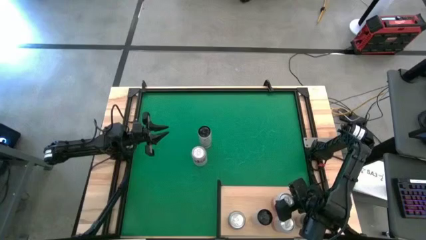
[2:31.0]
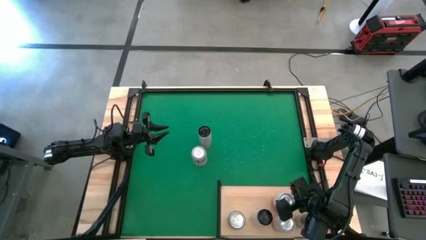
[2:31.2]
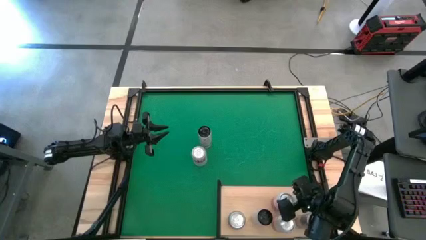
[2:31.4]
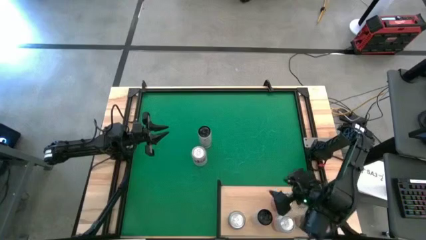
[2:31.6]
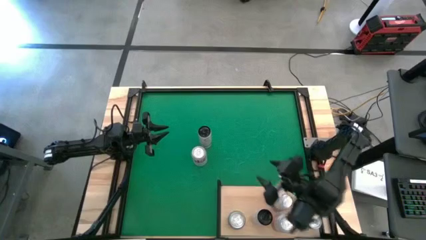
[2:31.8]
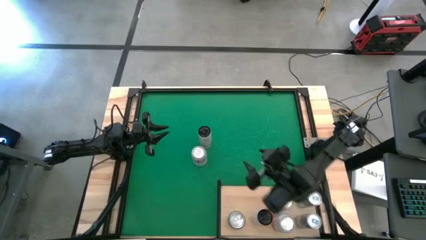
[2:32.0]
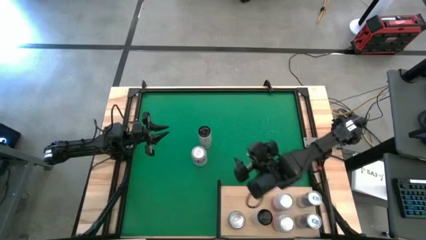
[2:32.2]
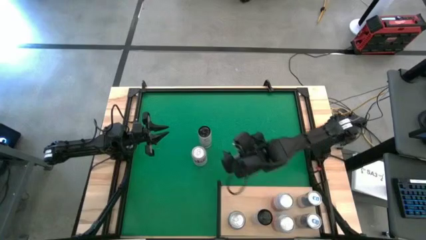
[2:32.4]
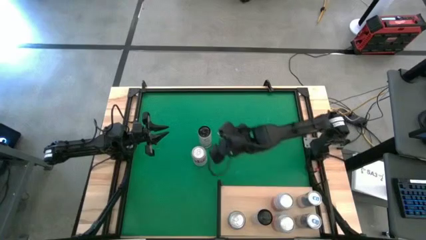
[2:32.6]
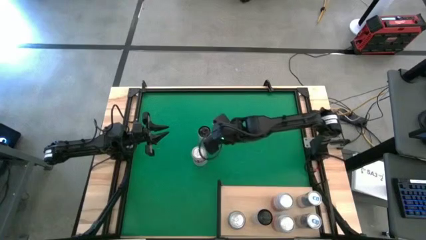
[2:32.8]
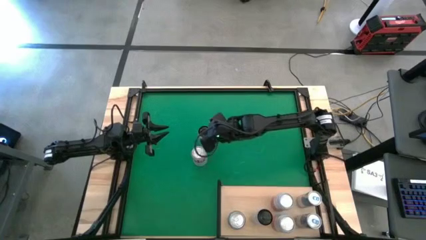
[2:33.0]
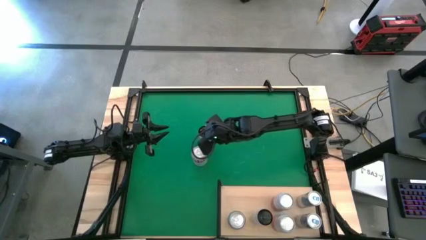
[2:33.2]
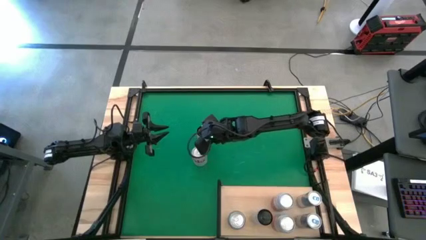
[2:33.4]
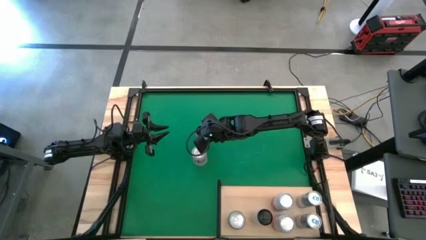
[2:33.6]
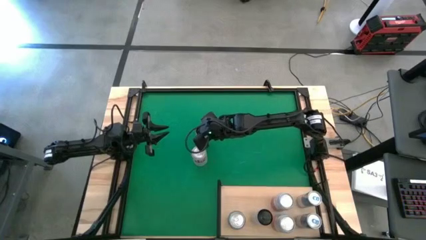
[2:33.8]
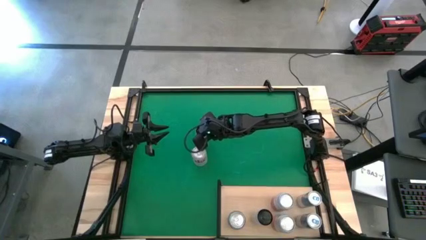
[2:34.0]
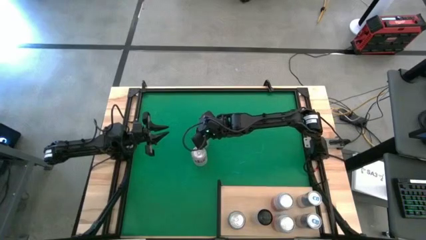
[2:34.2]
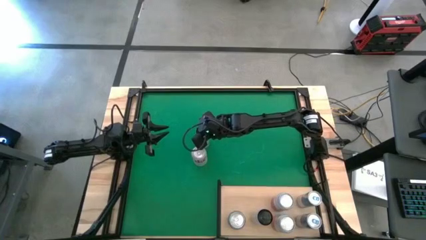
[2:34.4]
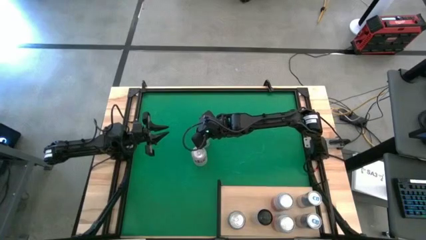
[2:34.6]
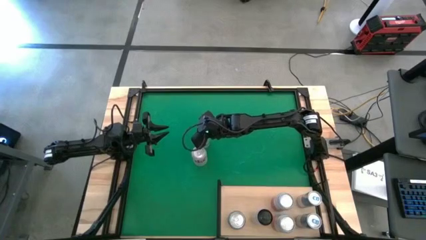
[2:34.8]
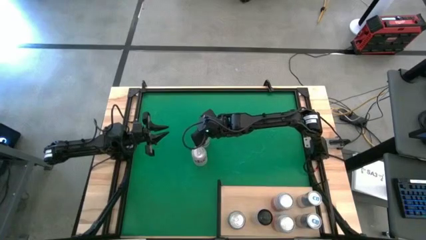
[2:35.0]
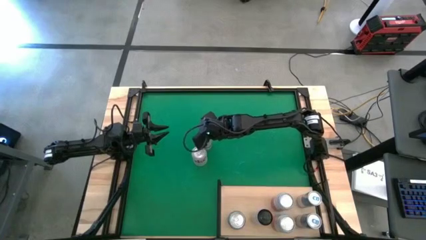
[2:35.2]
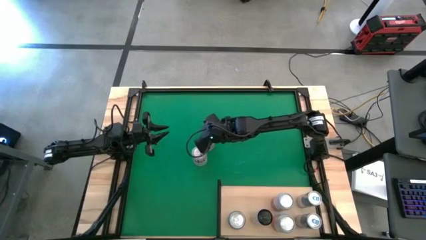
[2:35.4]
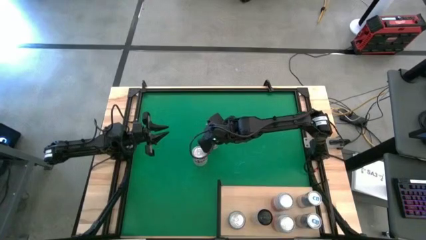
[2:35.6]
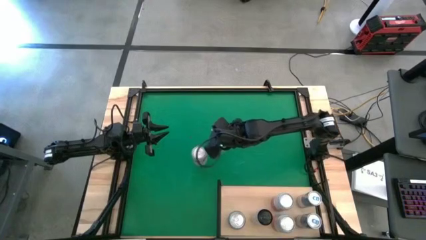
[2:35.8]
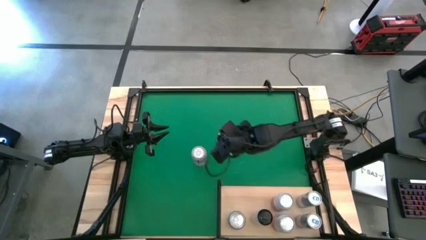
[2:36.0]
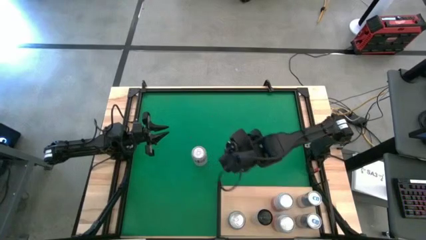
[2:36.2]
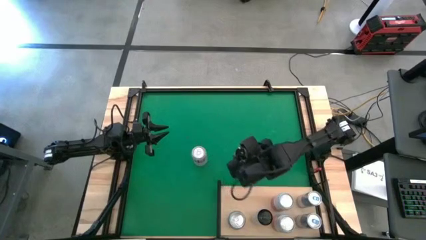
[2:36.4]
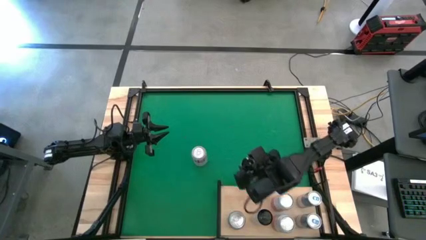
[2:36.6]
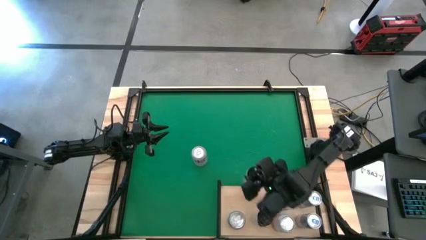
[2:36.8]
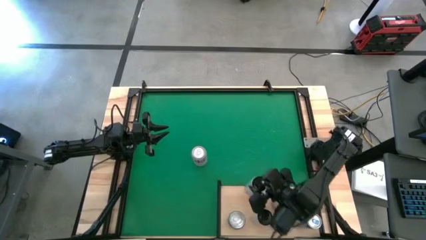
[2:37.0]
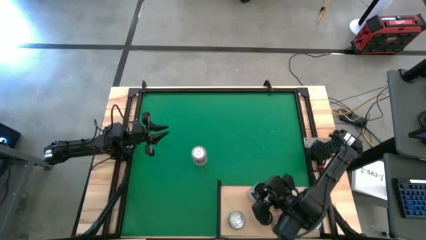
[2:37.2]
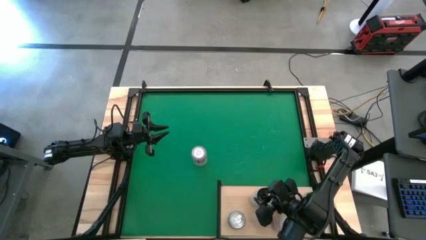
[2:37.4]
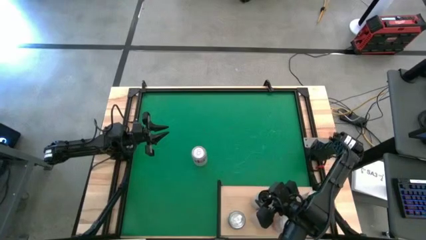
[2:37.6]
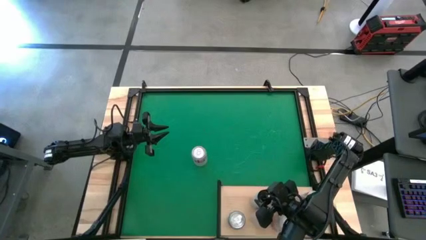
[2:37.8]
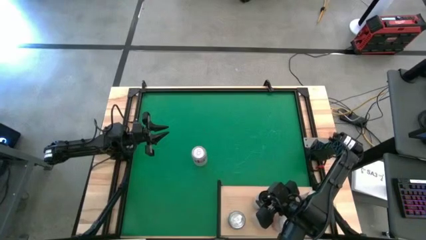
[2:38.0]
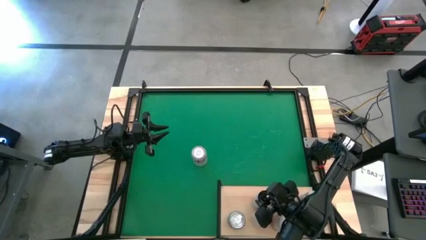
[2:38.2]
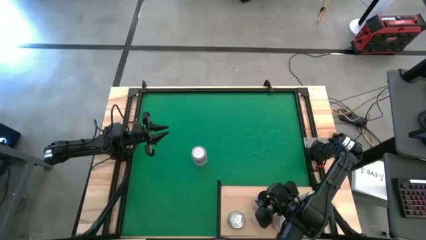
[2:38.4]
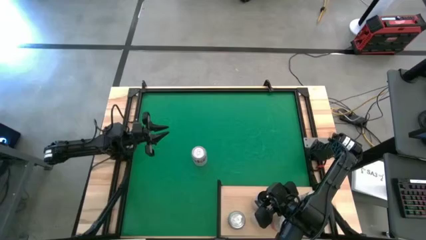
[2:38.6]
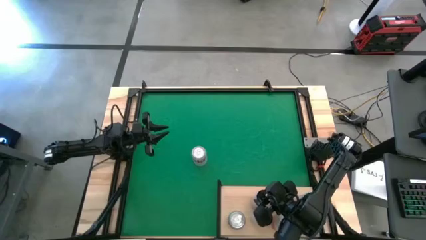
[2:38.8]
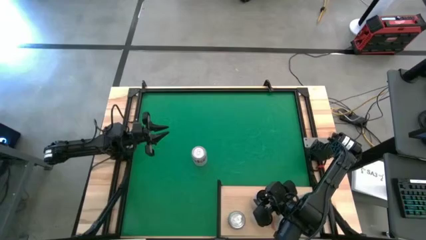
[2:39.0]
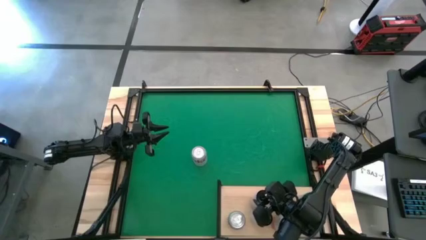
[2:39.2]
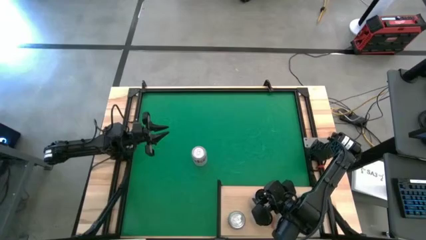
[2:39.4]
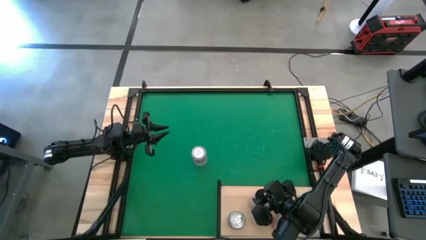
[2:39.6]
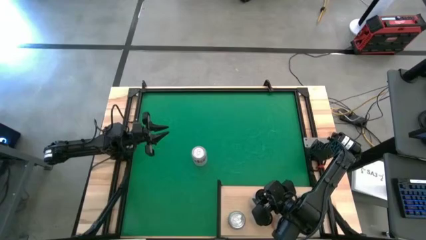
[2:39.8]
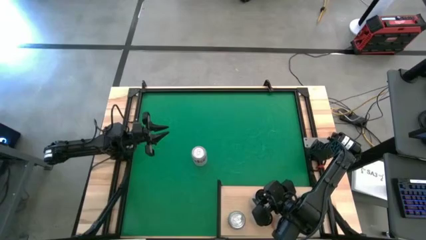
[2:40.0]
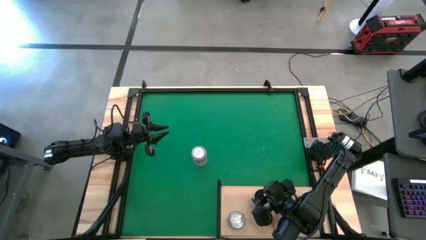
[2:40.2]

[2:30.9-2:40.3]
Task: Place canned beverage on shelf
Put the white yellow soda can on the shelf aligned with the other white yellow soda can

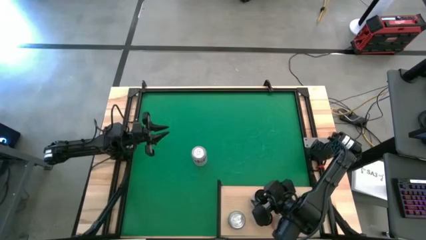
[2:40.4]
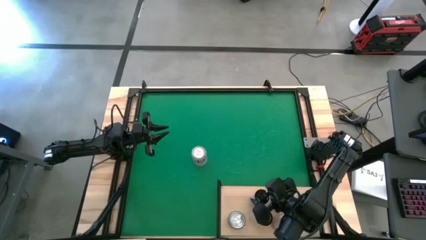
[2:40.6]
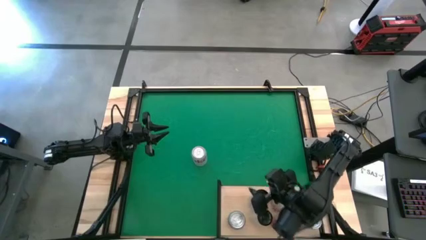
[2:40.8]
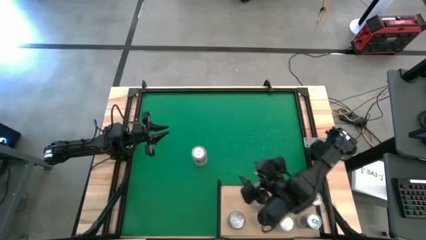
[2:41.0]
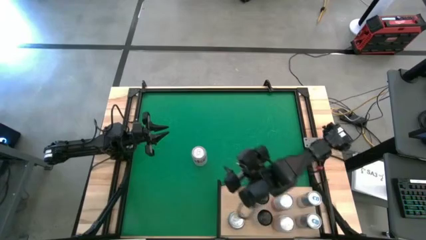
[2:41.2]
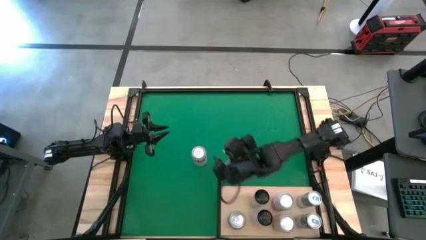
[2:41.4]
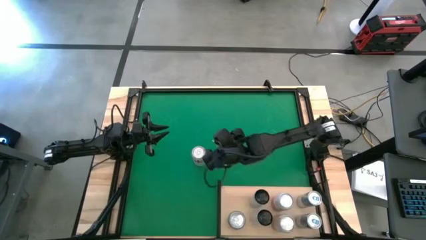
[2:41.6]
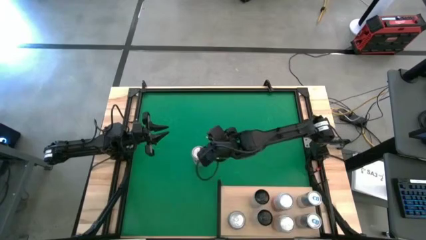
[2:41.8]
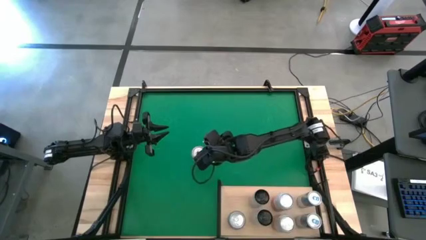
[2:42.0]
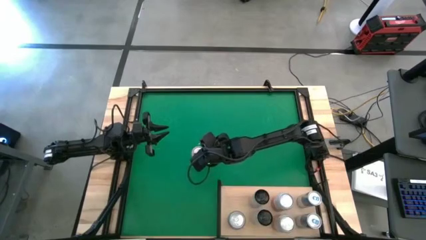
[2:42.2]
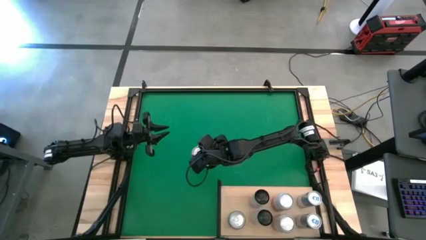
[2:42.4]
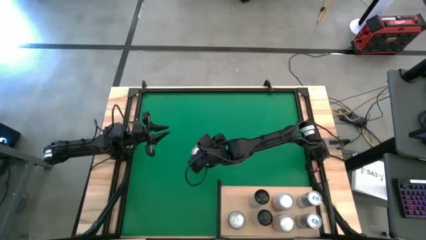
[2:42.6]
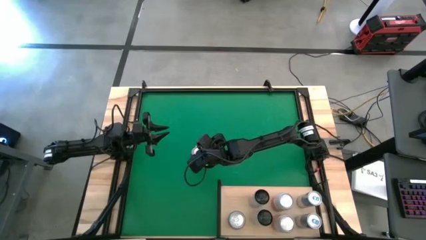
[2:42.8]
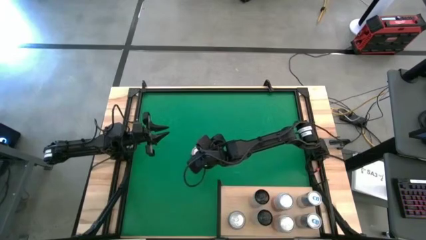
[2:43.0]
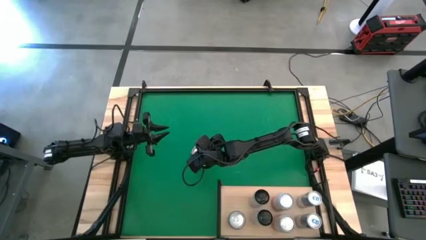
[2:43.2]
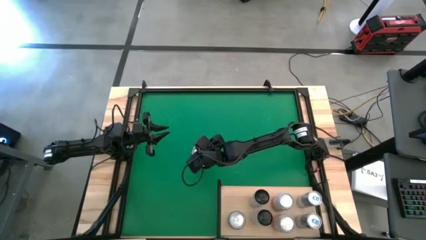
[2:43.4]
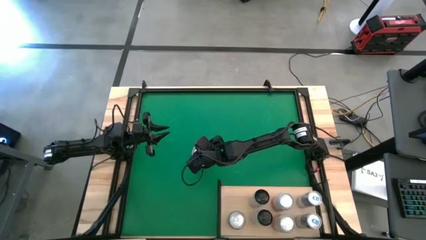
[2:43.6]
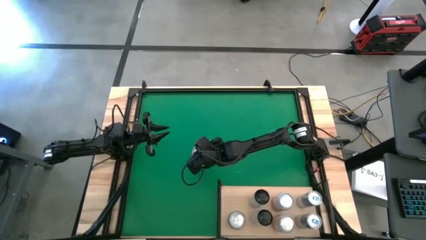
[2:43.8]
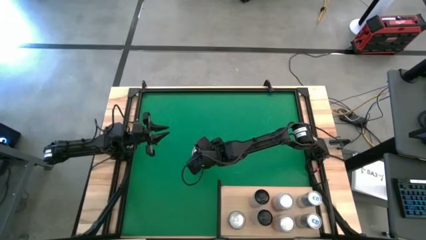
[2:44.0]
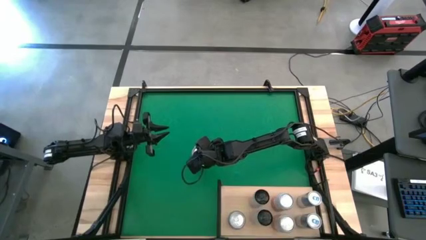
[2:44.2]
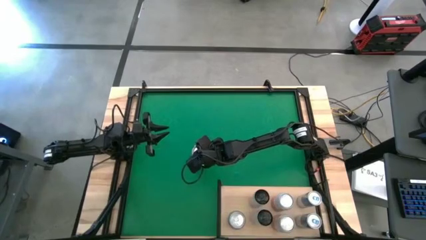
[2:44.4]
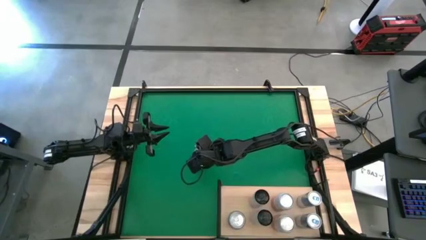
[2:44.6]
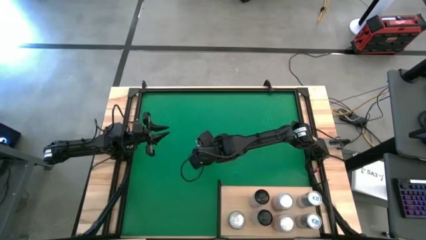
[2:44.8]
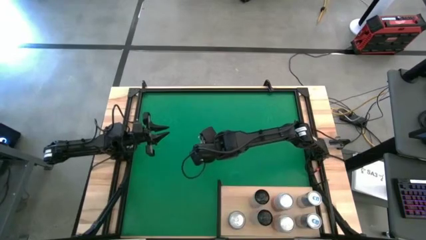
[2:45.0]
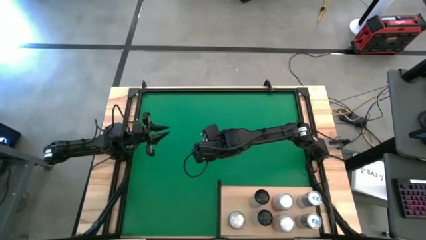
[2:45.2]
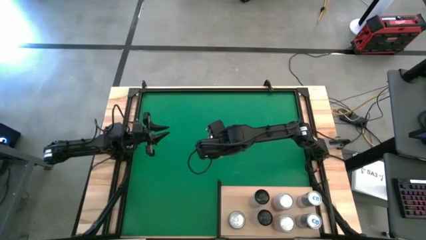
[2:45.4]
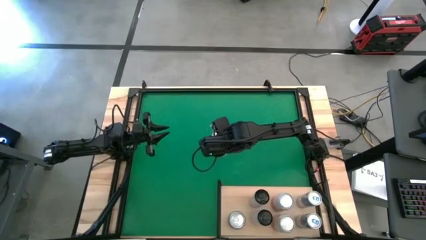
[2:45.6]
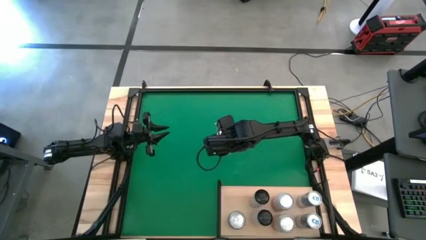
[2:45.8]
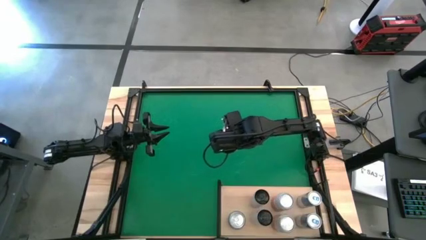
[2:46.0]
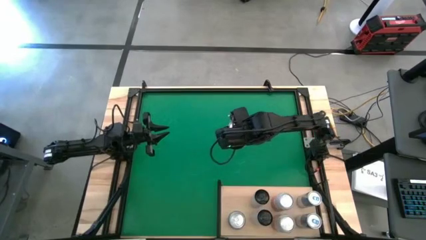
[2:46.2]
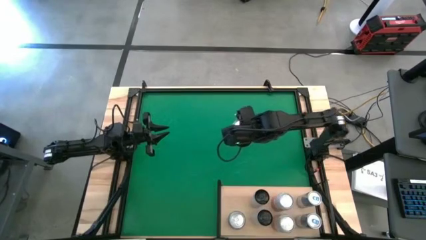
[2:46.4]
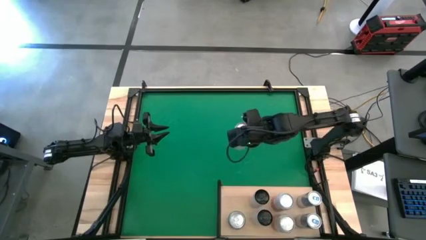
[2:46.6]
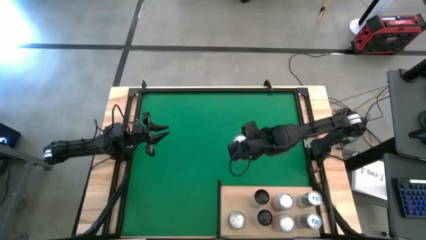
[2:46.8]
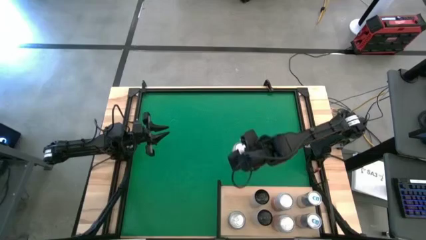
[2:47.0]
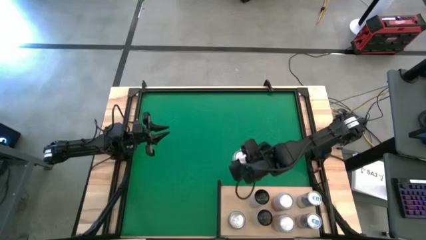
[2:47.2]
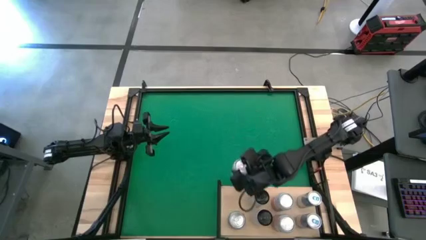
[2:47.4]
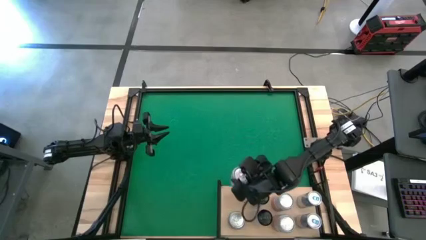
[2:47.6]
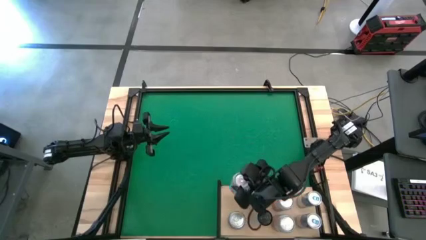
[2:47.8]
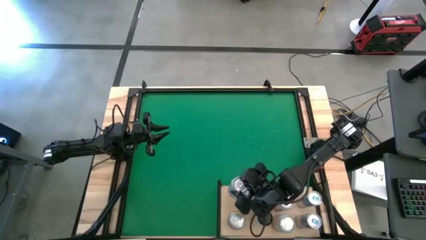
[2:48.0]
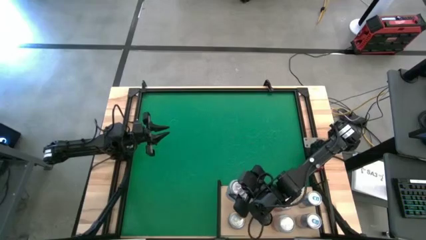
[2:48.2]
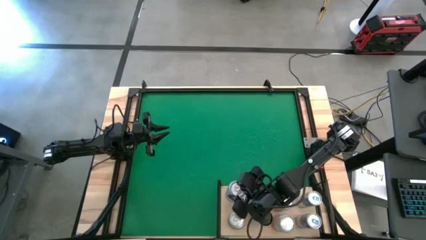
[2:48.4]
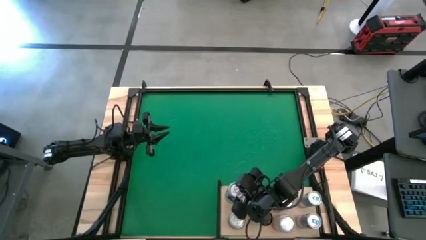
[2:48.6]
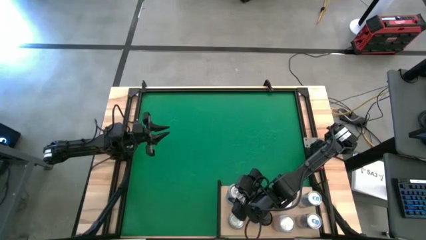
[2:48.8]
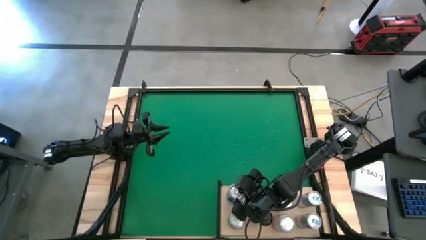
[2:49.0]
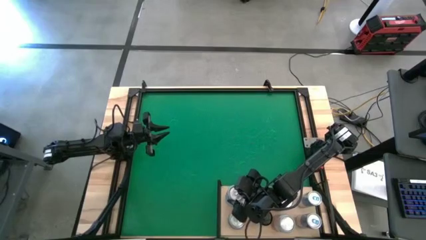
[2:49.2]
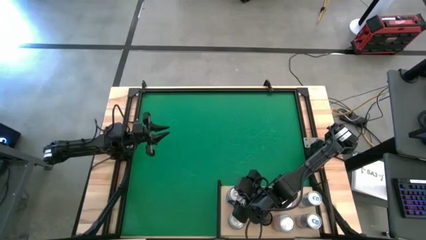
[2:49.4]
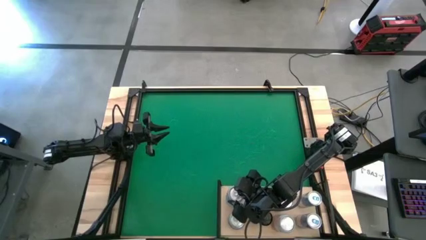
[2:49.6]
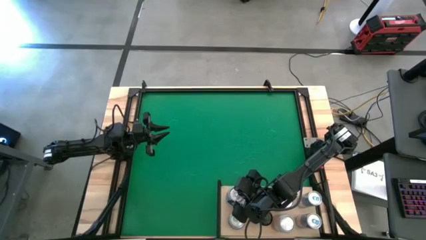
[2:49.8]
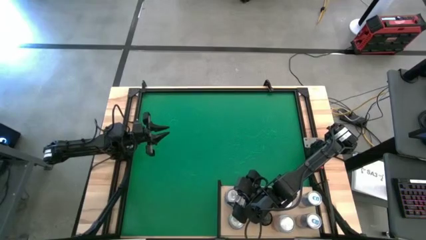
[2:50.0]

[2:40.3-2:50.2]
Put the red silver soda can on the shelf aligned with the other red silver soda can
